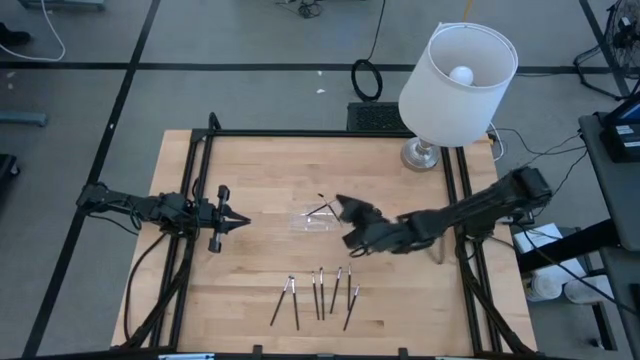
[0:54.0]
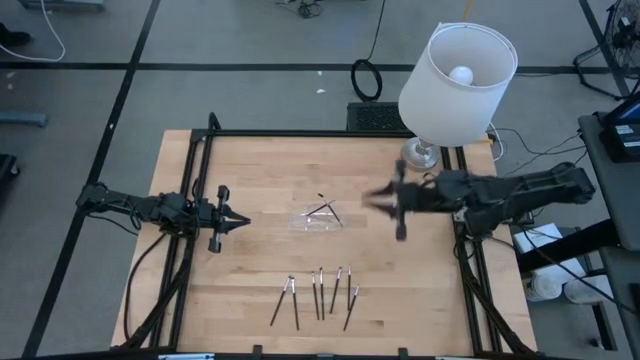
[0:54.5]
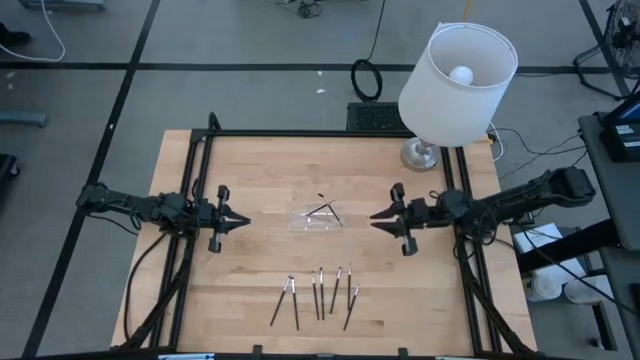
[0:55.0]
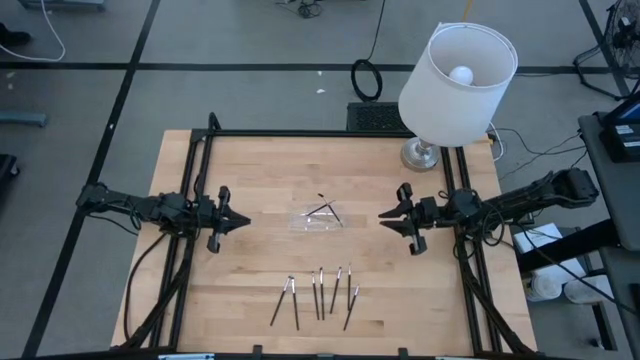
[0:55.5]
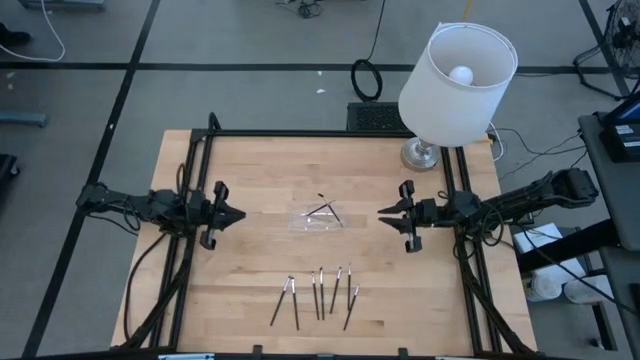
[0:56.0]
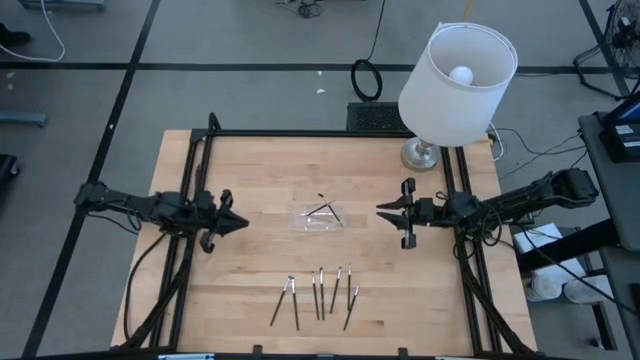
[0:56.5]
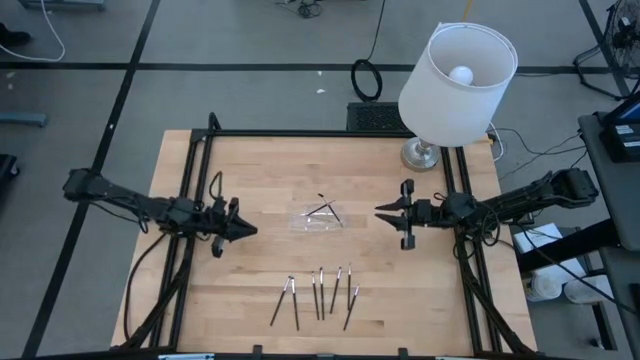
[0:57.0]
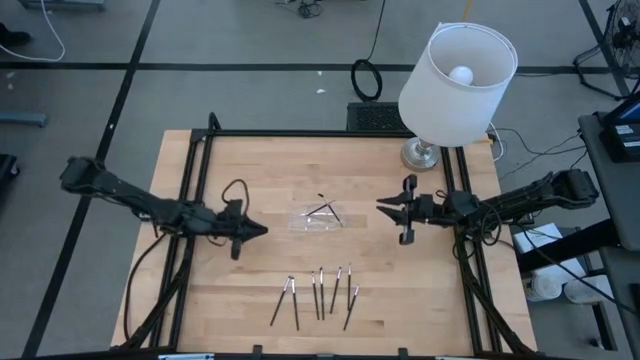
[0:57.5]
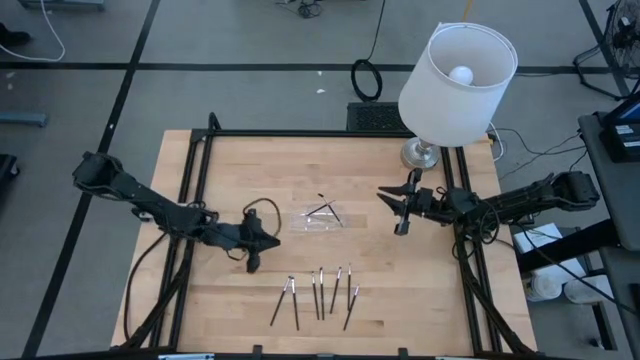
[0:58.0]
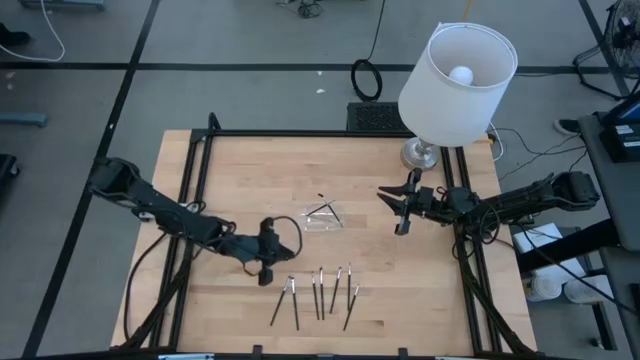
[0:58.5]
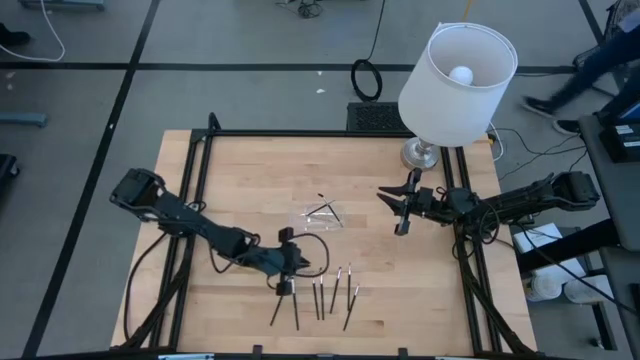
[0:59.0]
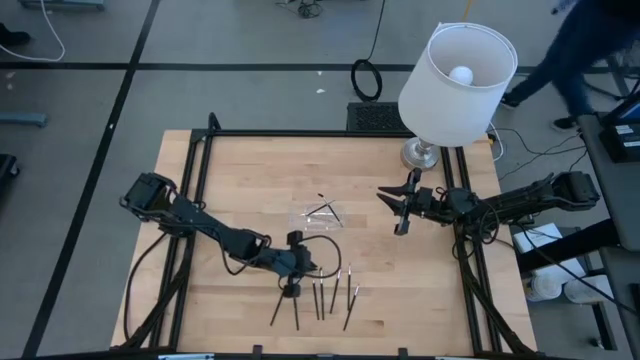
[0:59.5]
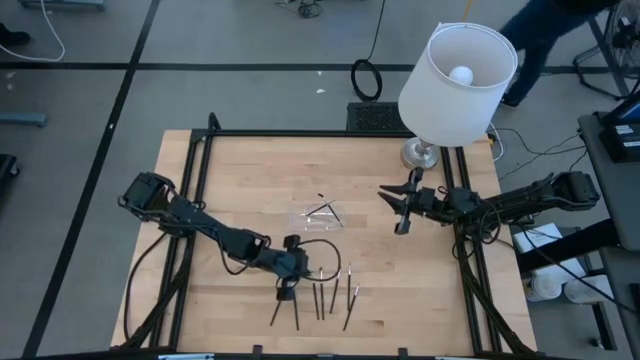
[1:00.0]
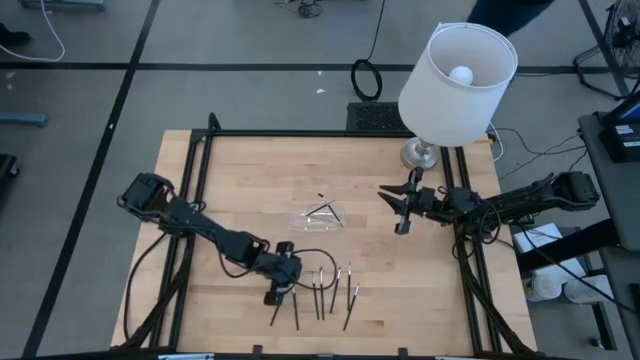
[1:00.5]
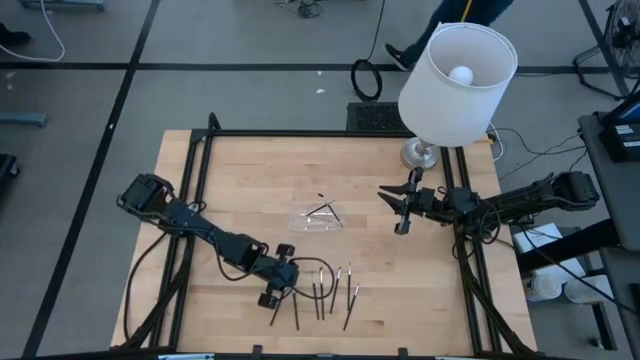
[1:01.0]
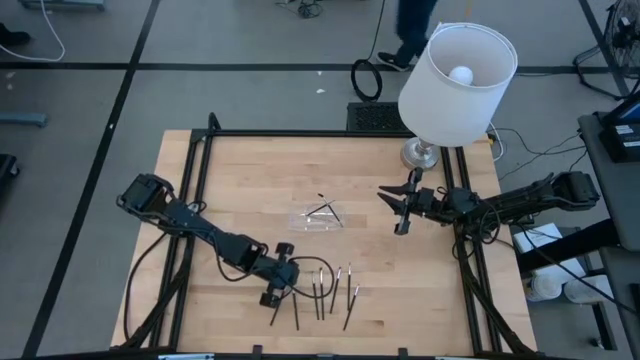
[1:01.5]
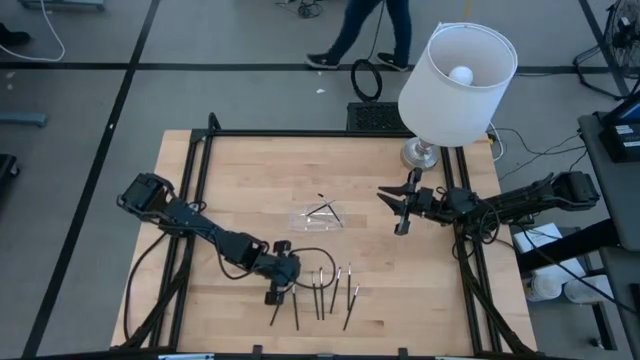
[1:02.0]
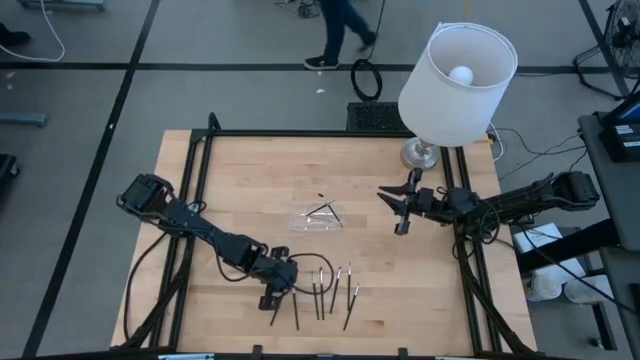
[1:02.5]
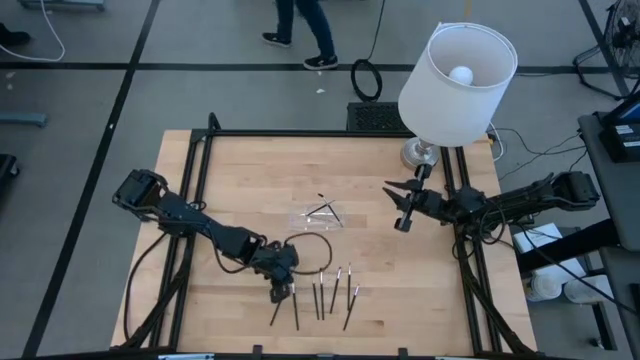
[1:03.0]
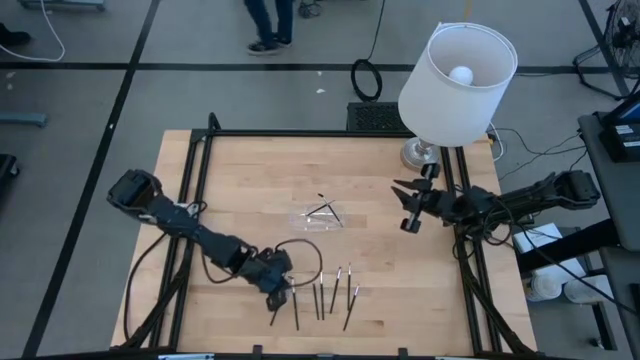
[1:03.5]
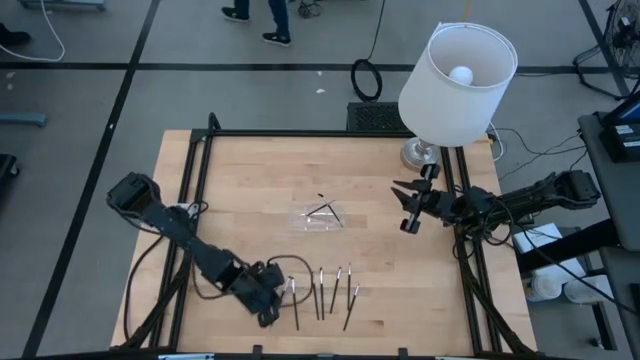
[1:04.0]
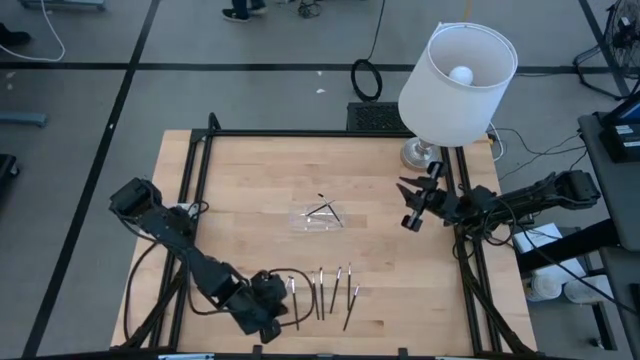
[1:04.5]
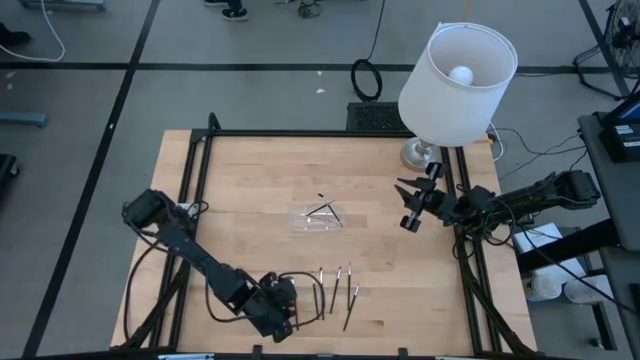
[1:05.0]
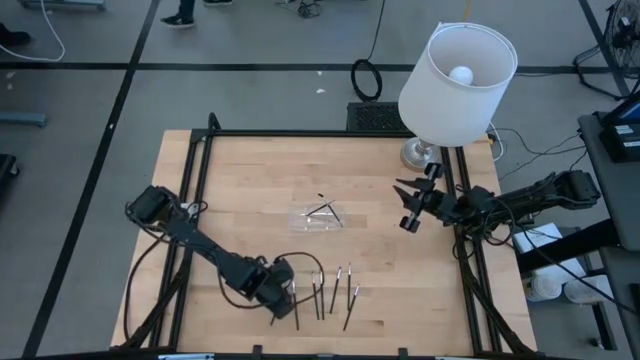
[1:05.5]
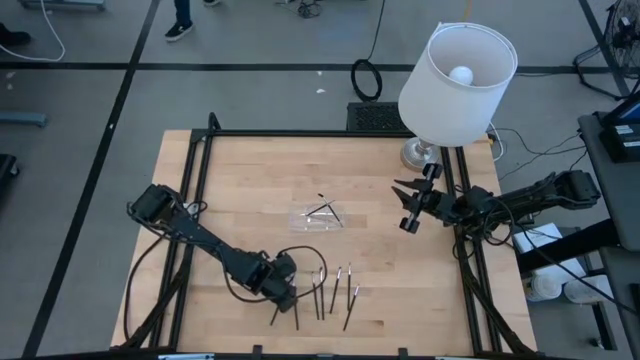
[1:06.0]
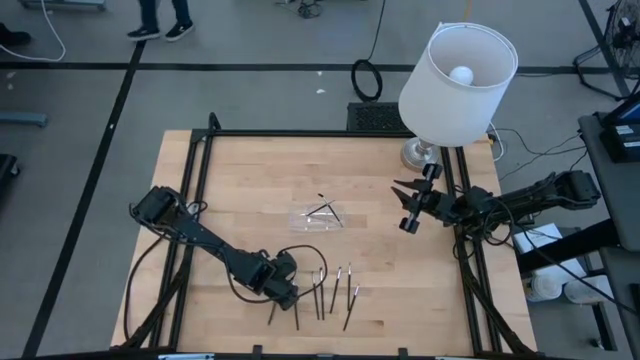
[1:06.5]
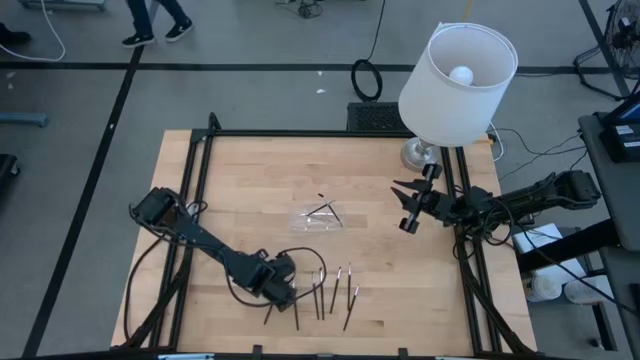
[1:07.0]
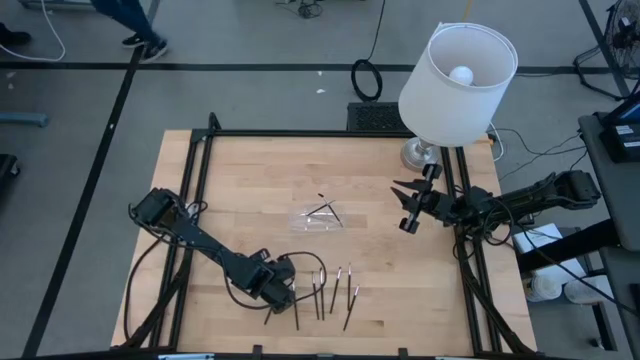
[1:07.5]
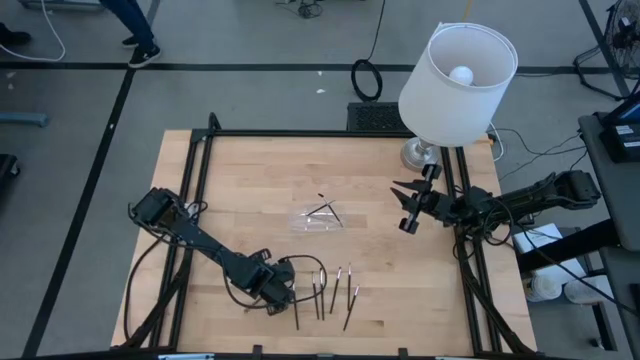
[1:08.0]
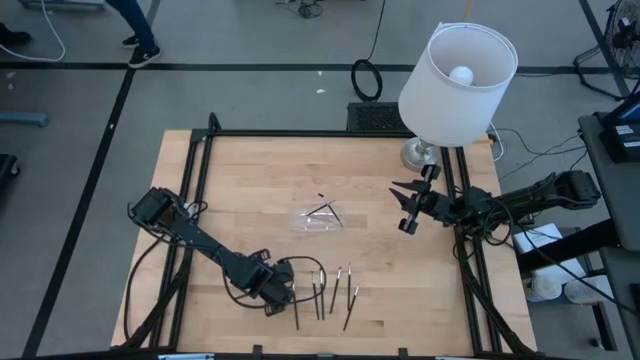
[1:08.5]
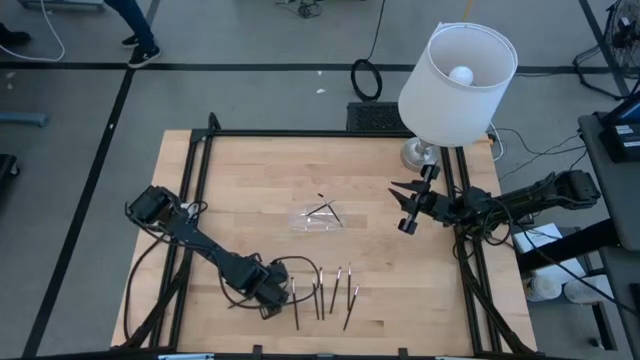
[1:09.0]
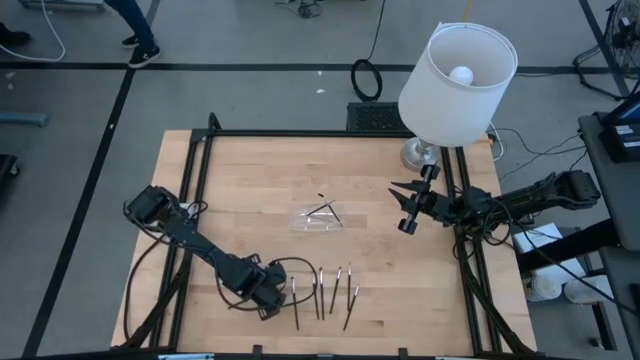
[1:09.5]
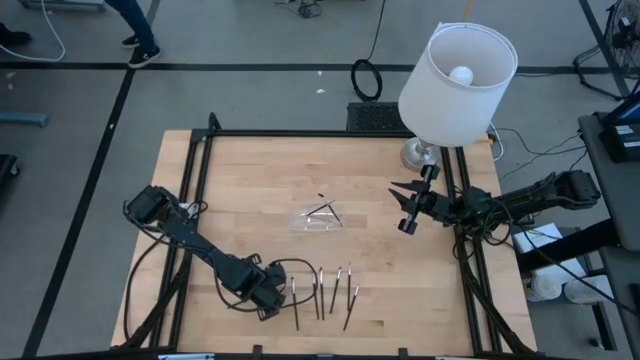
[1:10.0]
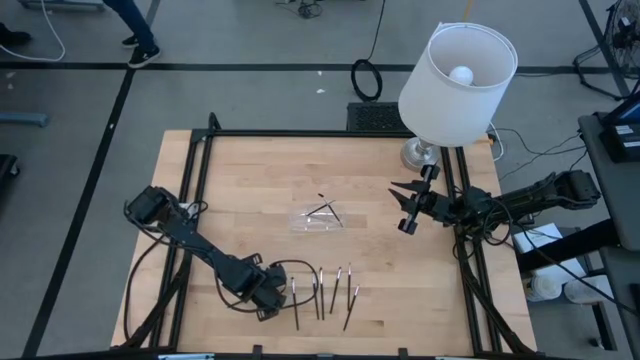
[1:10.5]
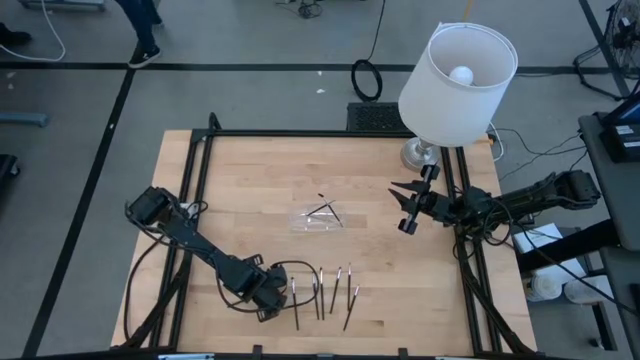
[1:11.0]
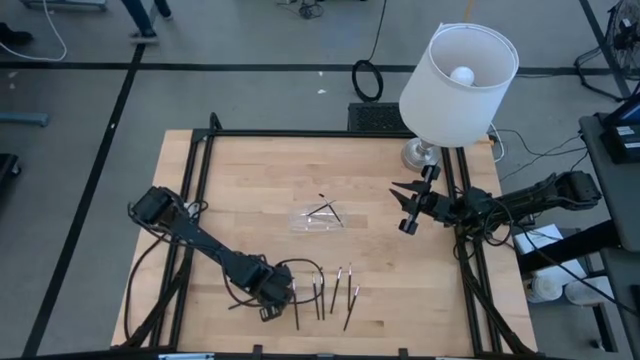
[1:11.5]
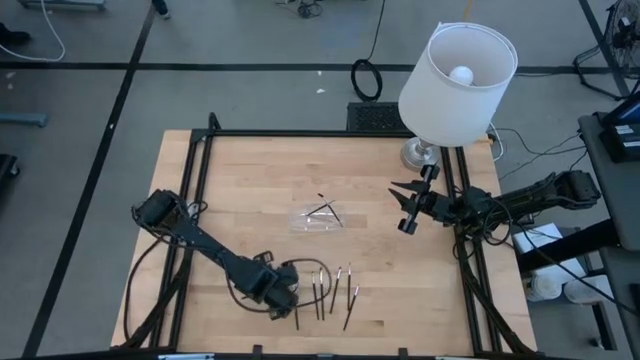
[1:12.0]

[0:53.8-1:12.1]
Task: Pick & Place Makeup Supplies
Put the makeup brush into the transparent organizer

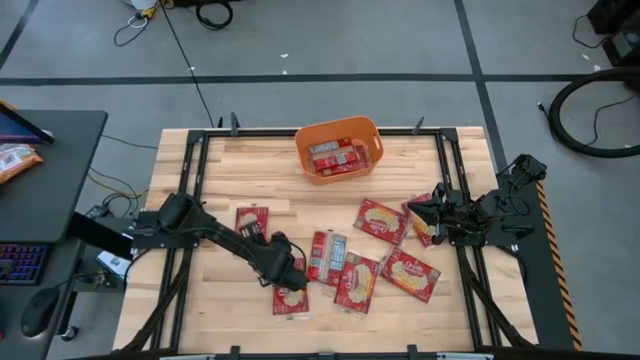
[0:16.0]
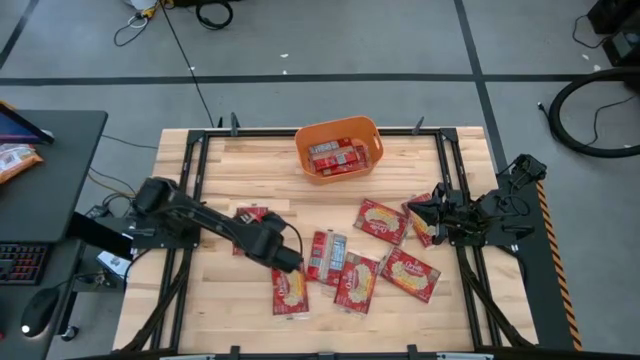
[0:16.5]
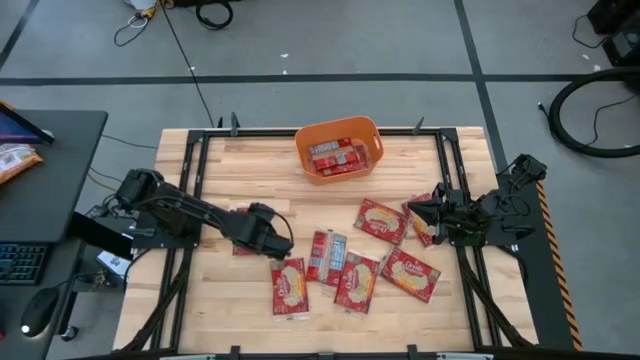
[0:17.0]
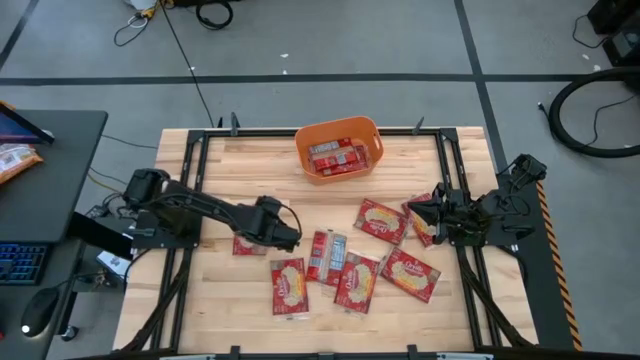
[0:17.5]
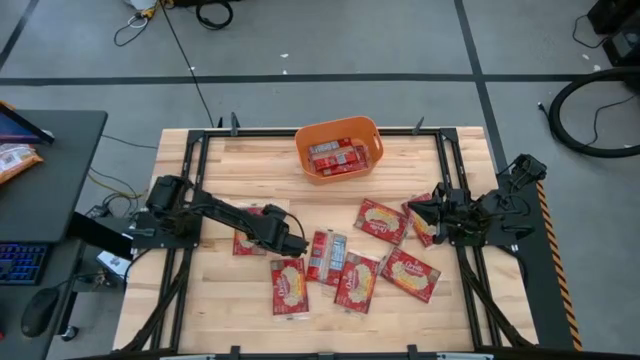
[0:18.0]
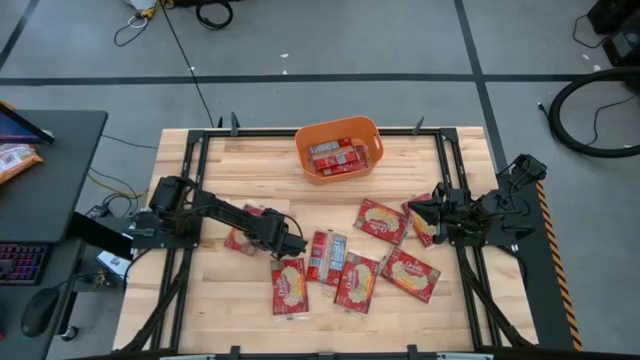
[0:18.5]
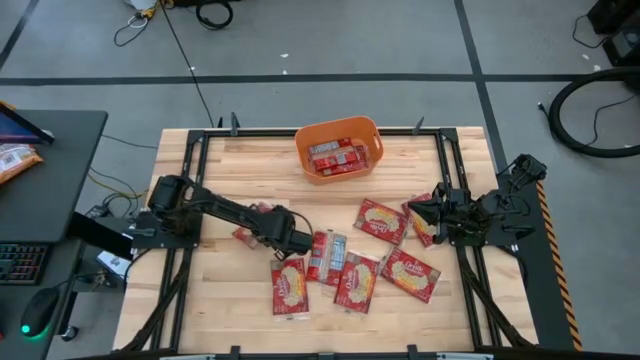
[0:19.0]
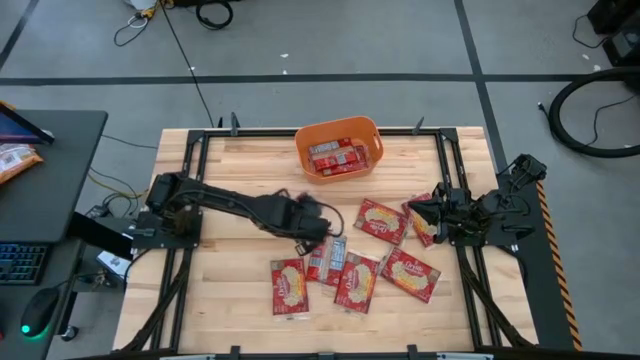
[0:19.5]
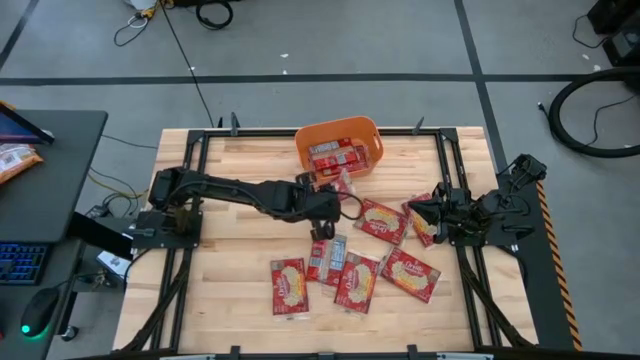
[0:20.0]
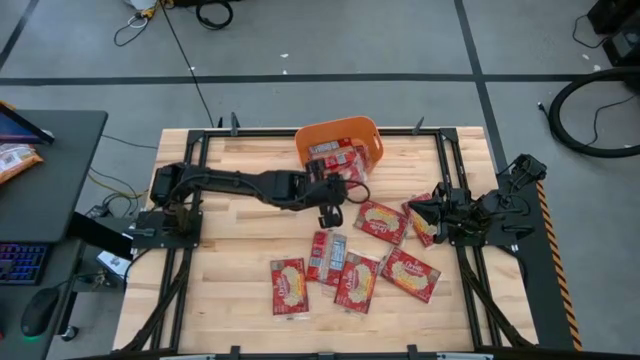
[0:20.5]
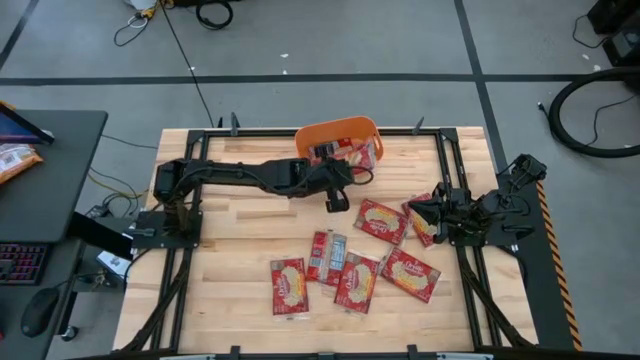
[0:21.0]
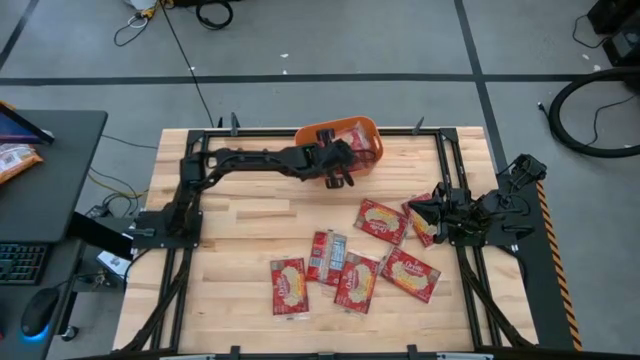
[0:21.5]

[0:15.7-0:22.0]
Task: Sort popcorn bags into baskets
Stack the popcorn bag on top of the stacked popcorn bag into the bin
